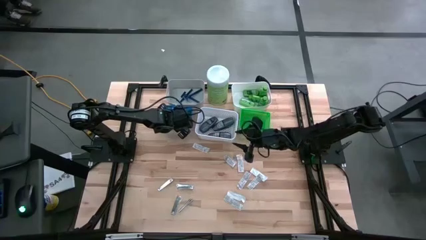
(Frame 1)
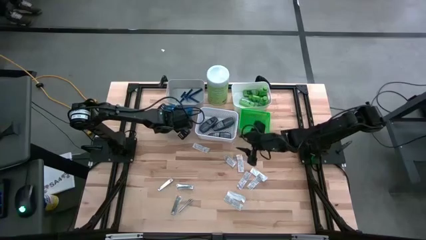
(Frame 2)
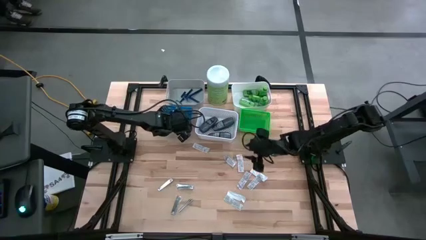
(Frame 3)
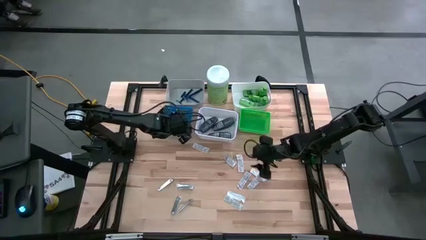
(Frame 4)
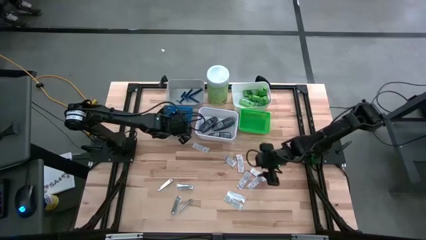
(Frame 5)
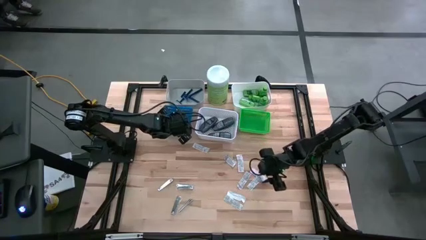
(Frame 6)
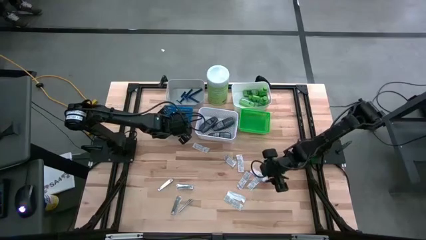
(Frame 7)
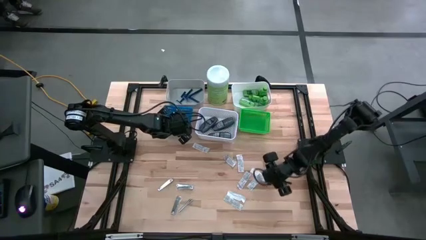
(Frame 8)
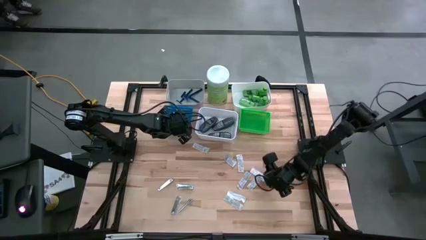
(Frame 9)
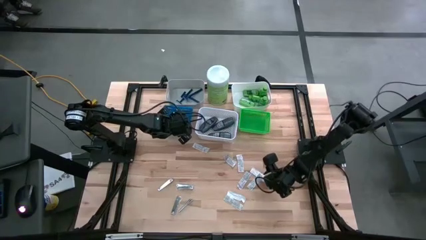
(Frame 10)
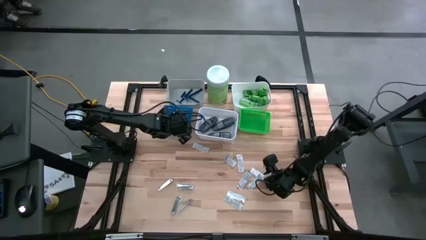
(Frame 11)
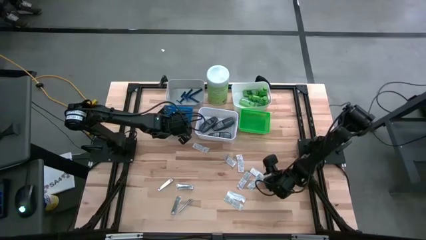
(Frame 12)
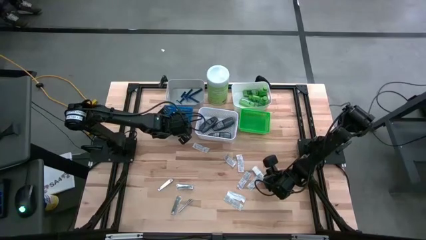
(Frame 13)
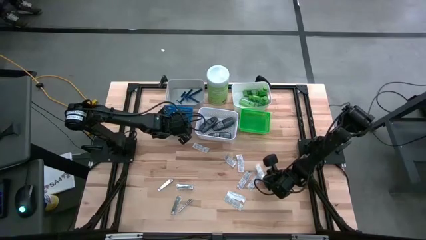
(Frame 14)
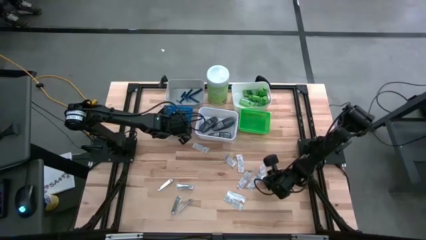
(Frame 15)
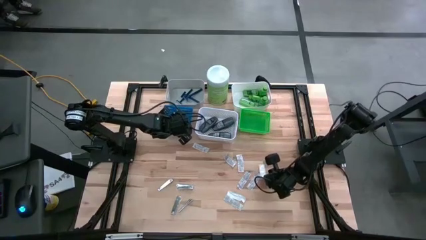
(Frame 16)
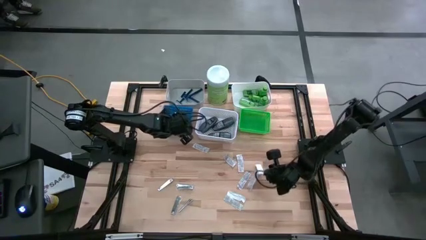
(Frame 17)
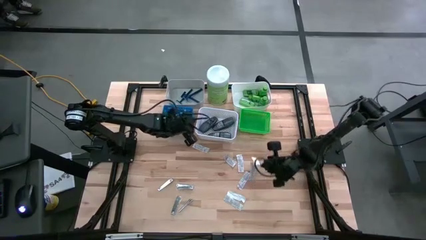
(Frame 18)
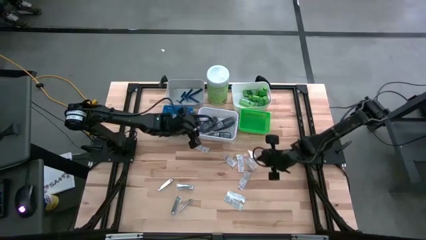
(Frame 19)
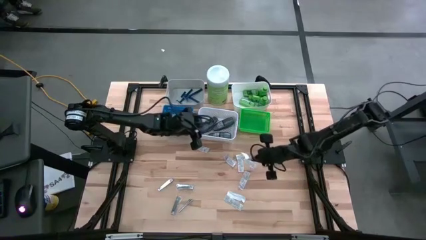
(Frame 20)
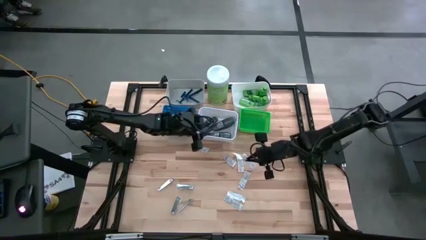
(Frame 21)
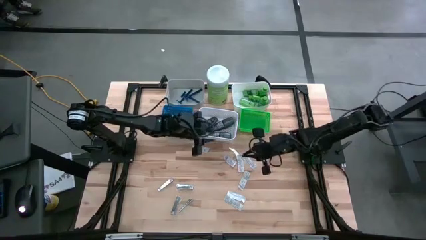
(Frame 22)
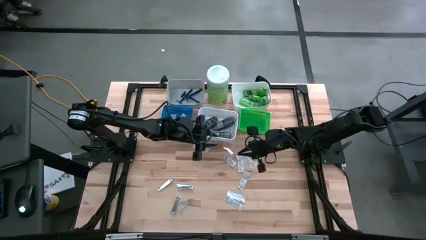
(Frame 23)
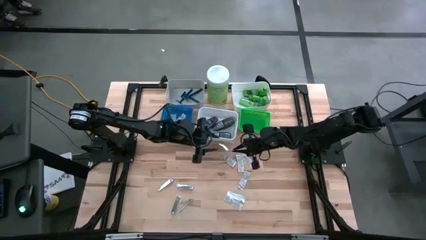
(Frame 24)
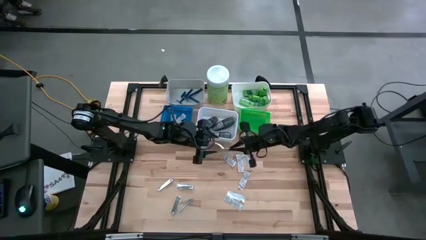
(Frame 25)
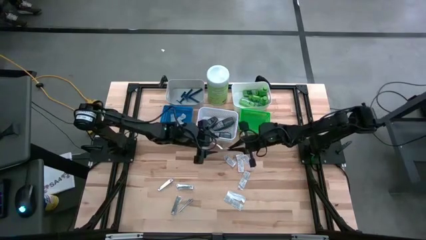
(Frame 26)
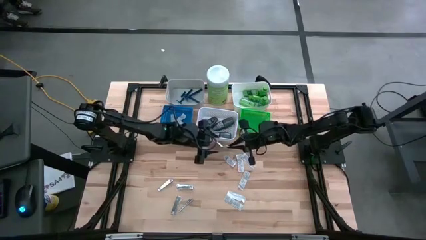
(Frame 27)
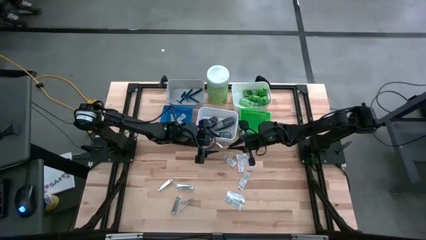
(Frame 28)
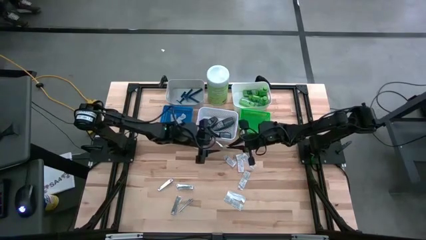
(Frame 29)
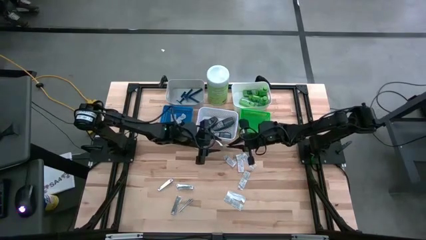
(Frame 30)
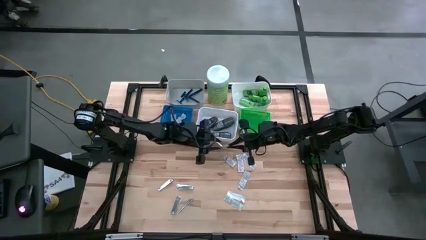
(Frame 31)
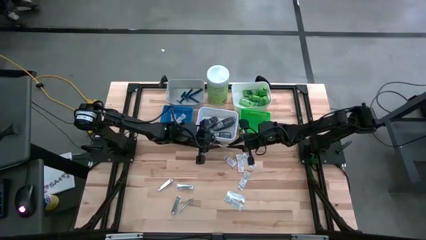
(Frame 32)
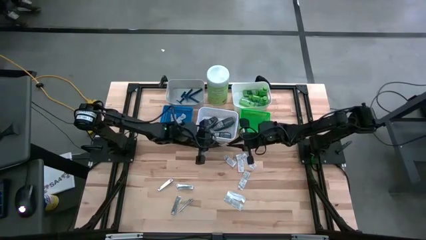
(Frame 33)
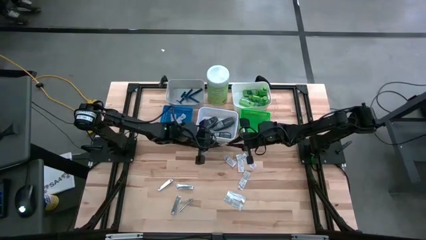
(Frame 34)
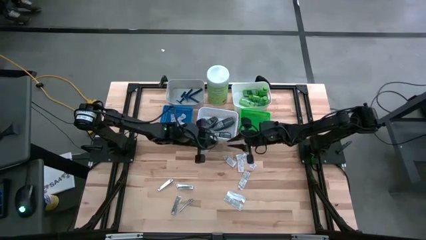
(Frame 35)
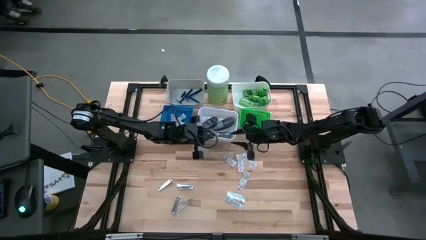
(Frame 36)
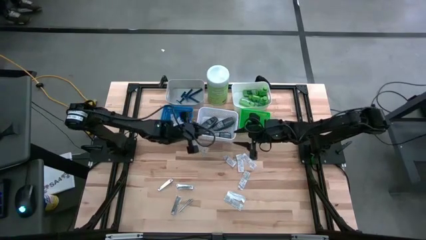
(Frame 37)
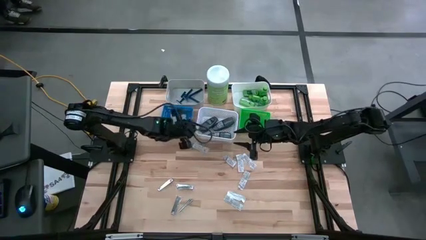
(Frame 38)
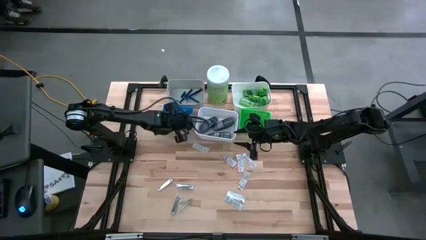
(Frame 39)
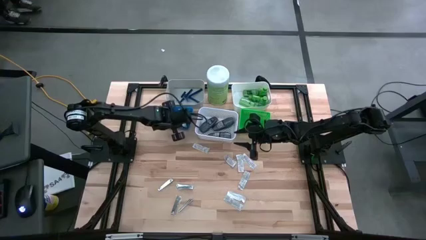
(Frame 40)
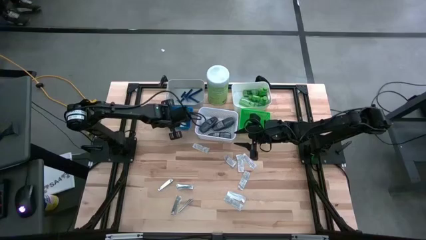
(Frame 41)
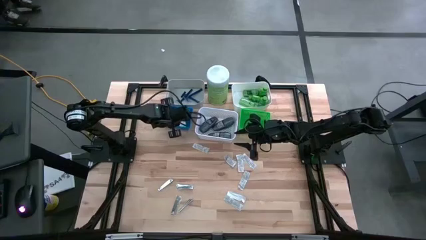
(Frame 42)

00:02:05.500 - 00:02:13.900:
Task: Pick & Place Travel size toiletries
Put the white bandage into the blue bin

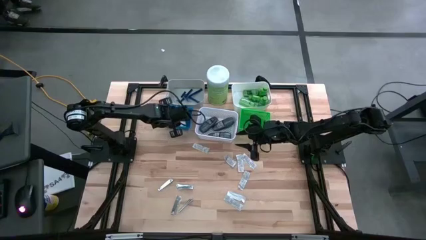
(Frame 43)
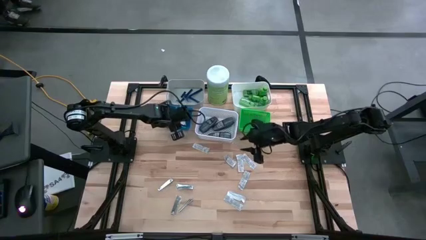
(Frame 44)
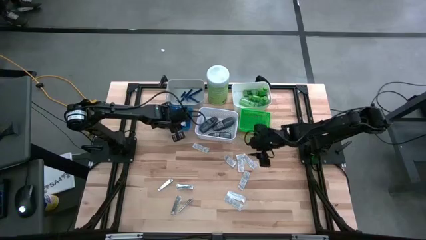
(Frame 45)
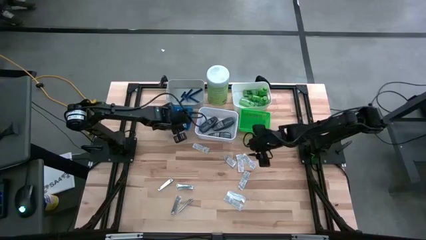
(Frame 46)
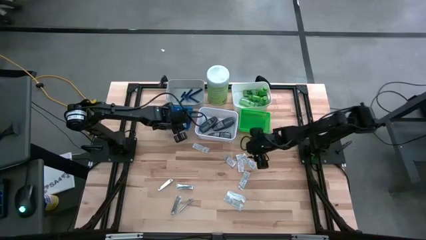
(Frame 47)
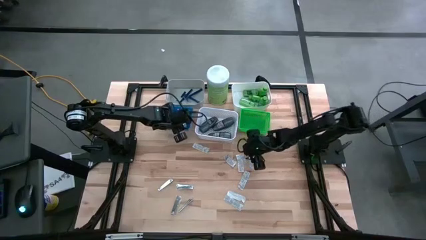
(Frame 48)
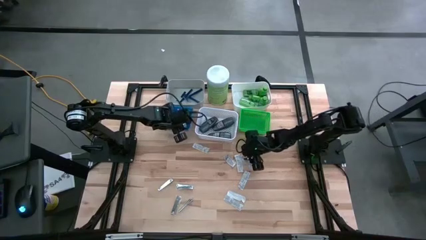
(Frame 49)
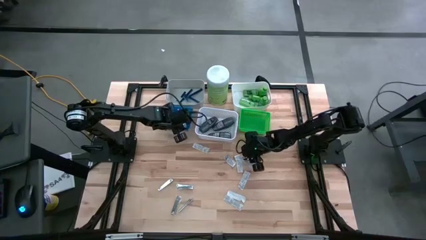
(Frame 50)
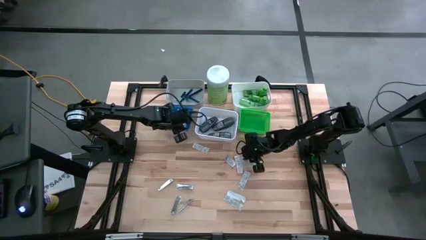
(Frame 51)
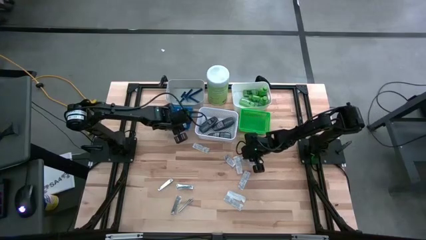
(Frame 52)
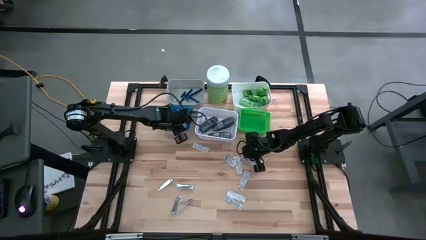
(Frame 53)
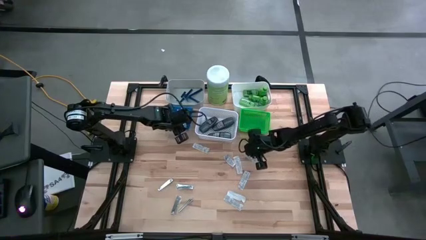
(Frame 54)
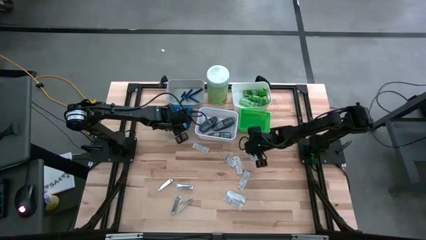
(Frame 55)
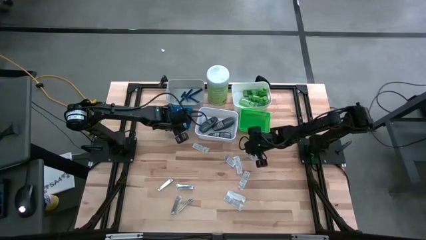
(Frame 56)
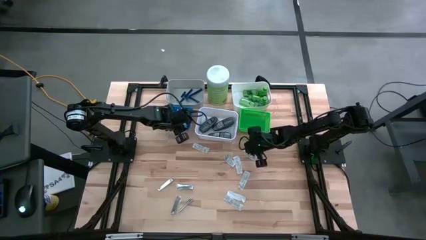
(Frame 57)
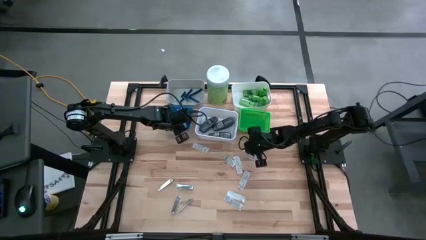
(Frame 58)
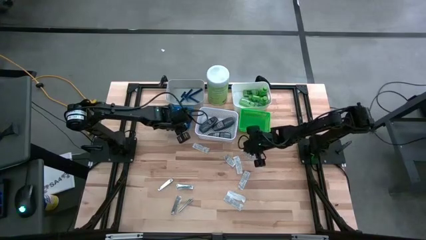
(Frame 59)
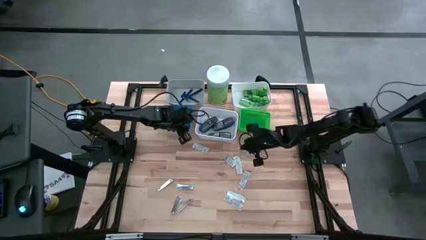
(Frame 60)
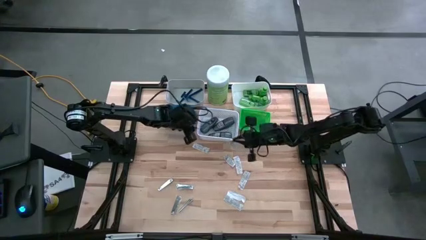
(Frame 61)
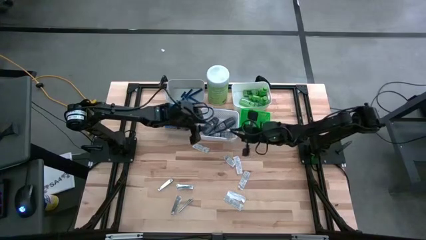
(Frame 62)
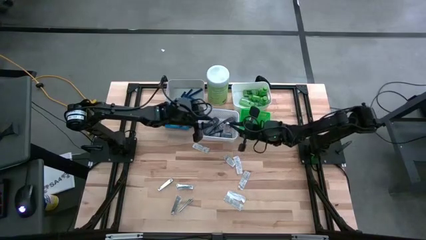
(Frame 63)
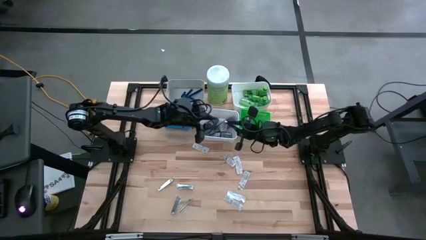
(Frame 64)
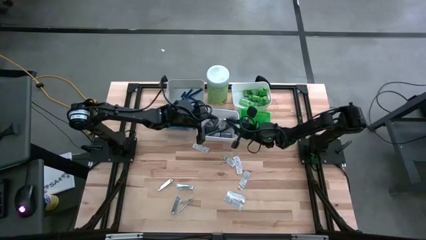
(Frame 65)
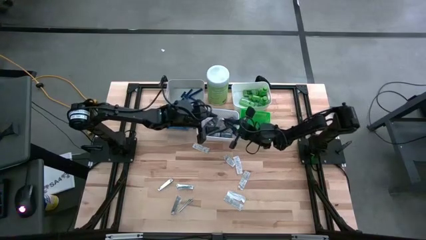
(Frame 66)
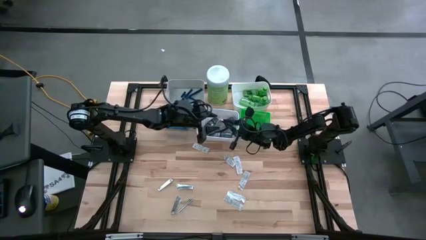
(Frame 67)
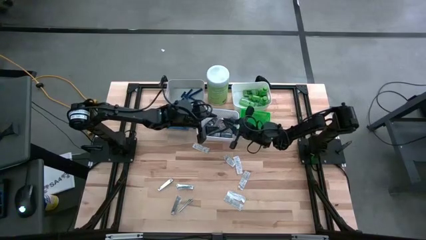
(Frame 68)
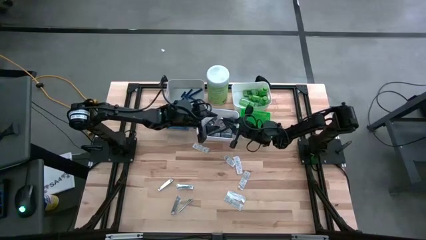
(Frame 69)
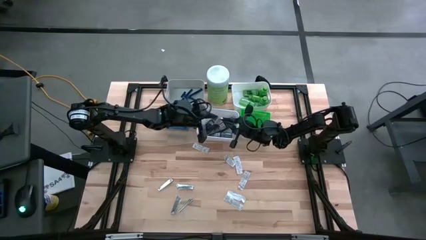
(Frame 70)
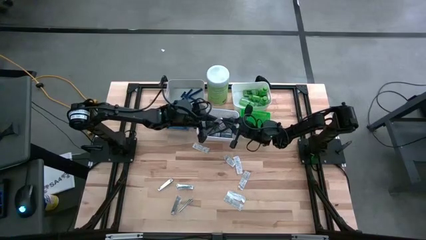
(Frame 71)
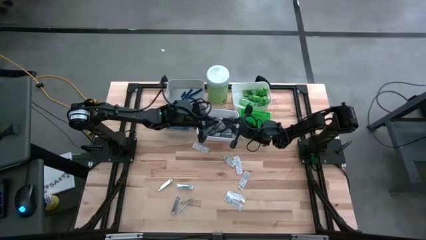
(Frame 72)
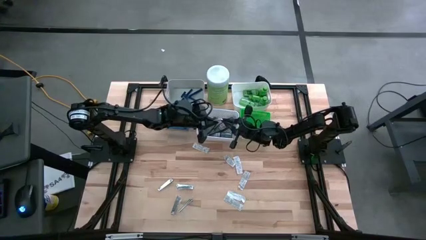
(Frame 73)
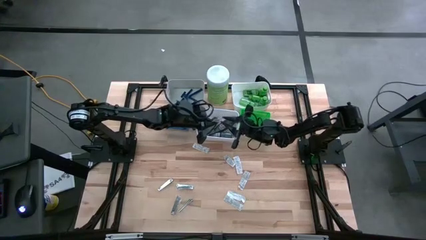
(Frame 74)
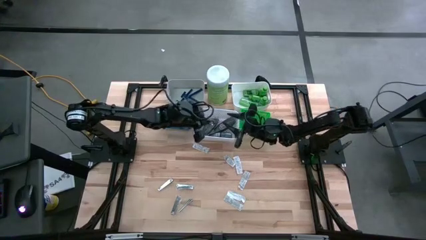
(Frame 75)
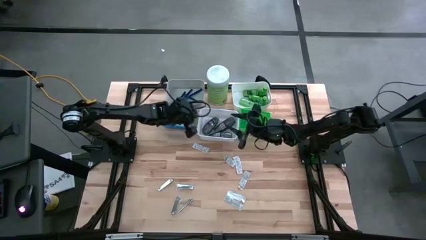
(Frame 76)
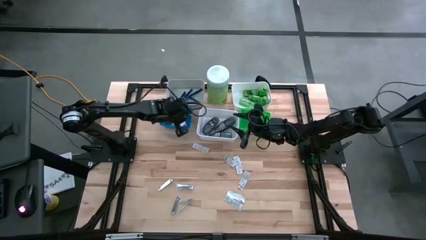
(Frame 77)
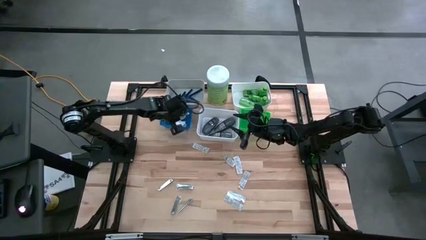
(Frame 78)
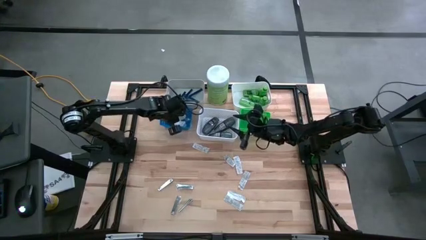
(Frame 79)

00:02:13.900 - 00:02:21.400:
Put the white bandage into the blue bin
